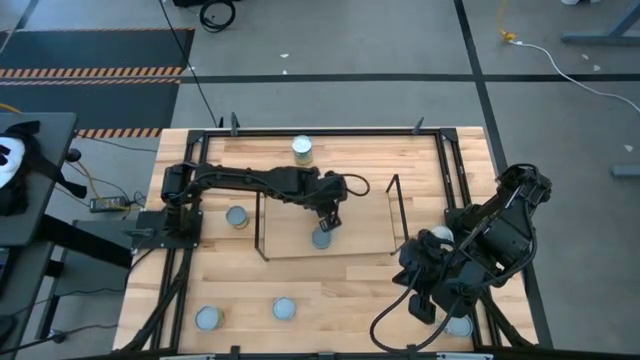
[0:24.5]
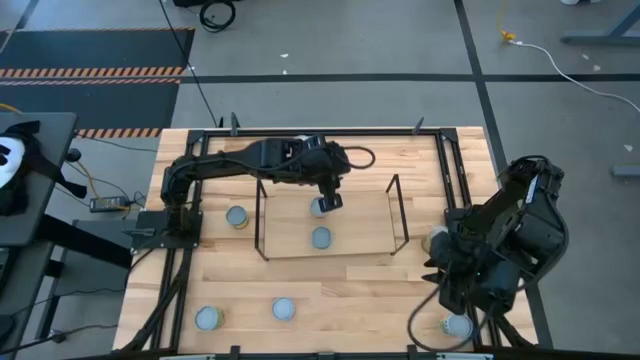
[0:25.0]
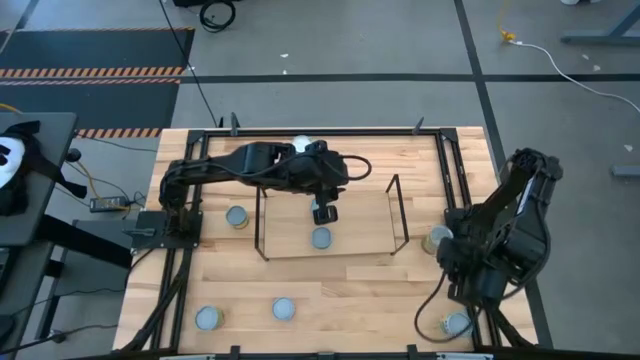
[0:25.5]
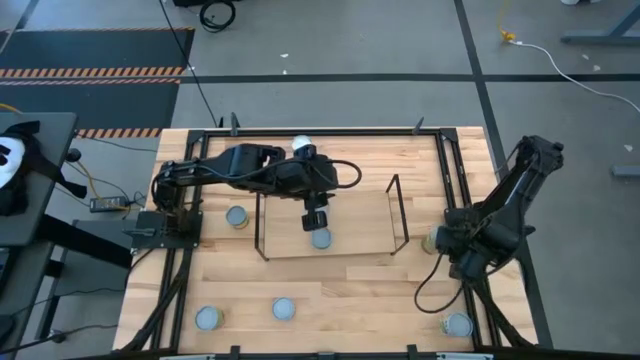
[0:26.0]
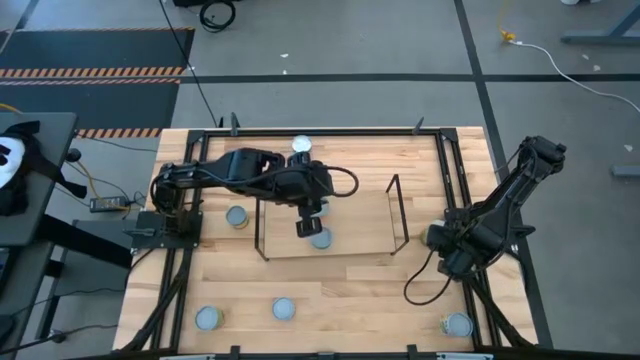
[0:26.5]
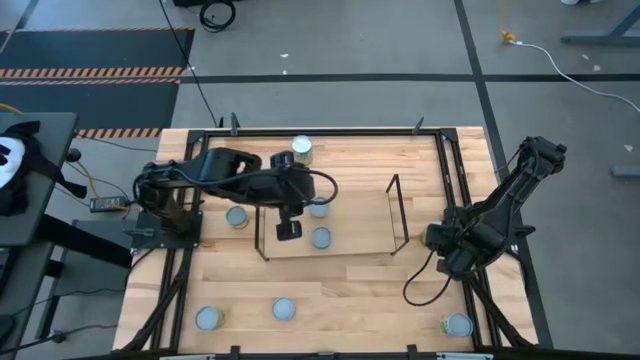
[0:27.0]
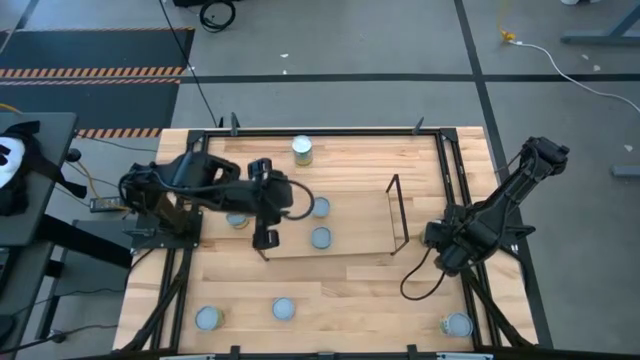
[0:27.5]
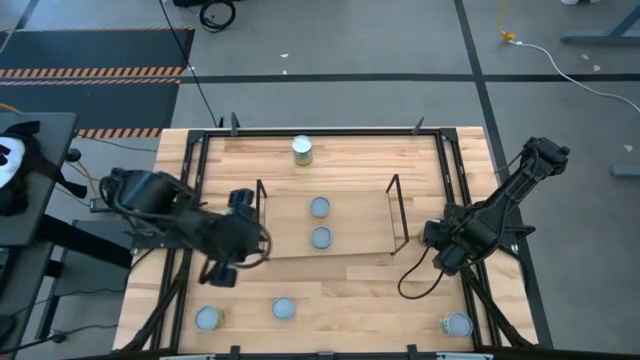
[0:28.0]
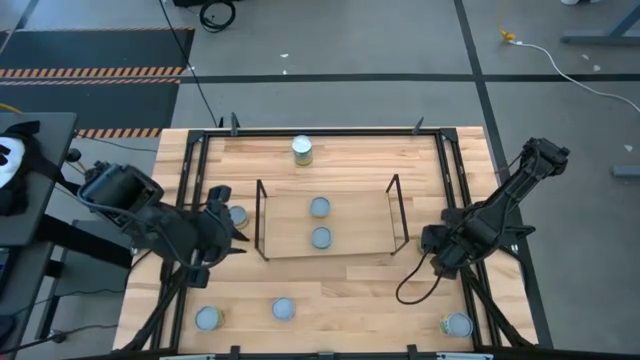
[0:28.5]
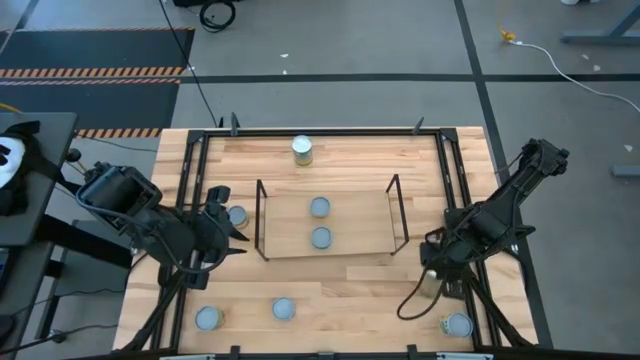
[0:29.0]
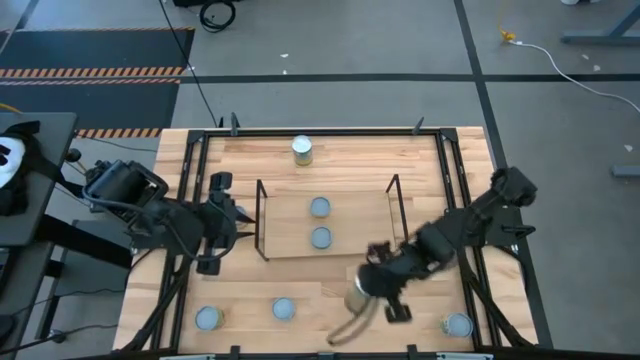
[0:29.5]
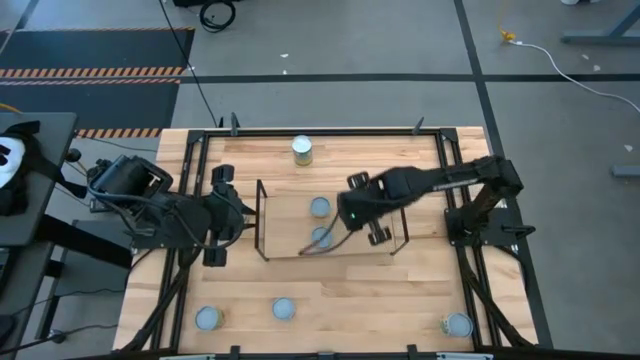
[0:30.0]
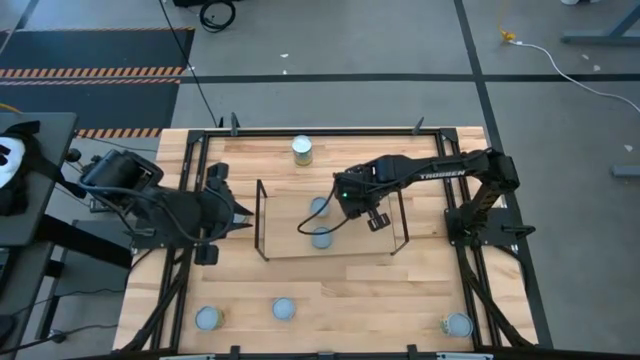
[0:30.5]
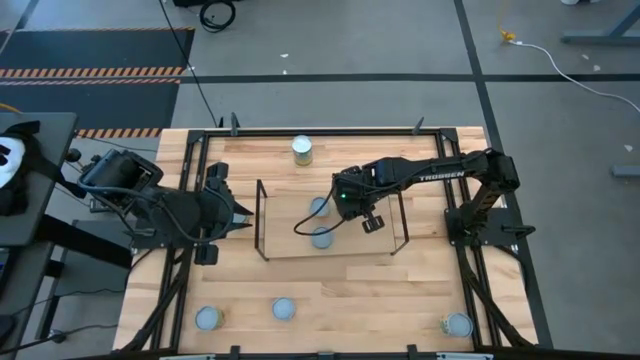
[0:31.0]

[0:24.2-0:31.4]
Task: Pick and place cans onto a shelf
Put the canned oranges on the shelf

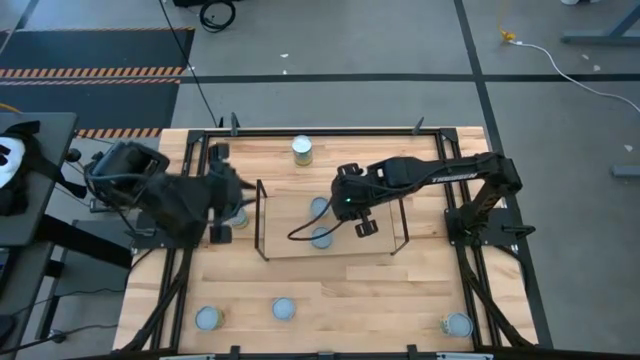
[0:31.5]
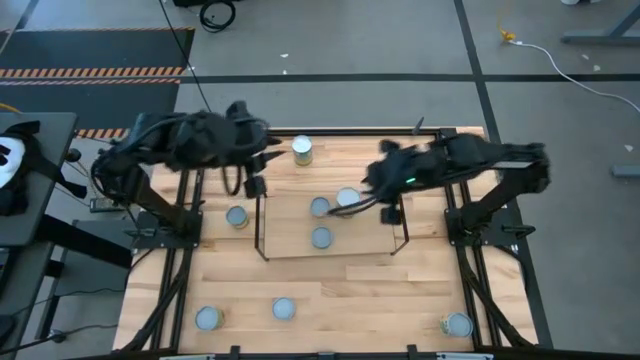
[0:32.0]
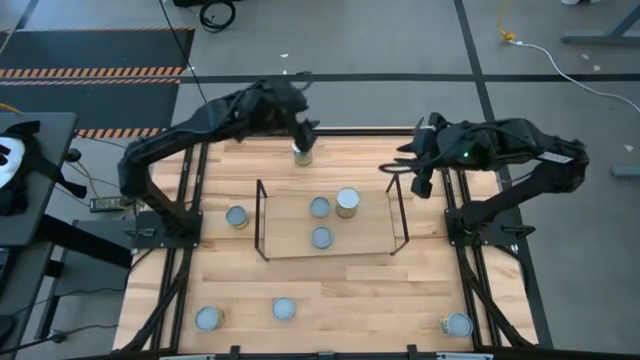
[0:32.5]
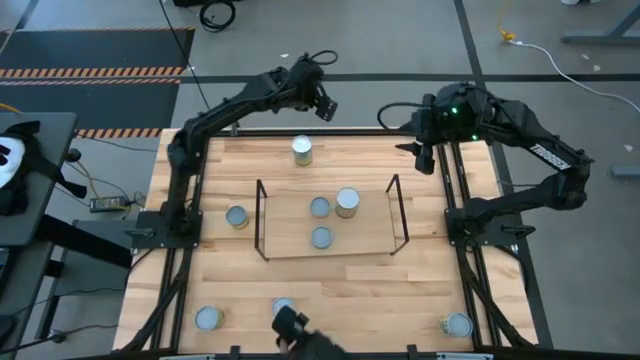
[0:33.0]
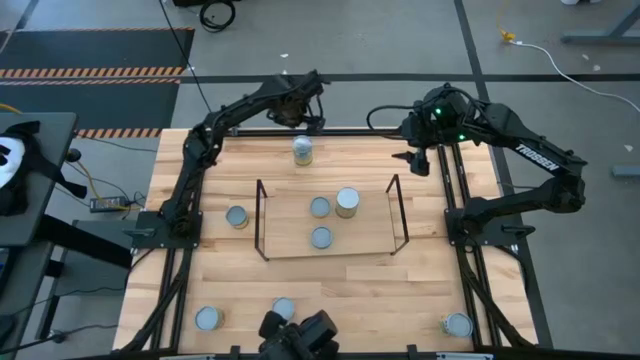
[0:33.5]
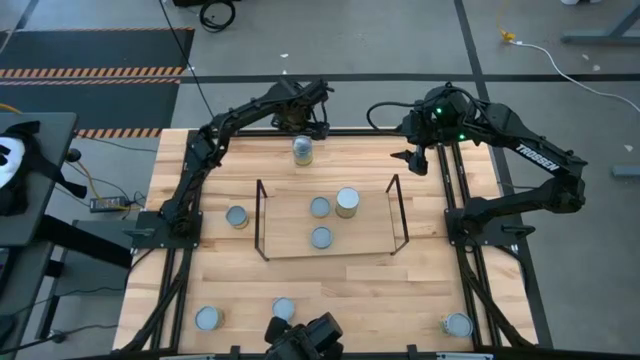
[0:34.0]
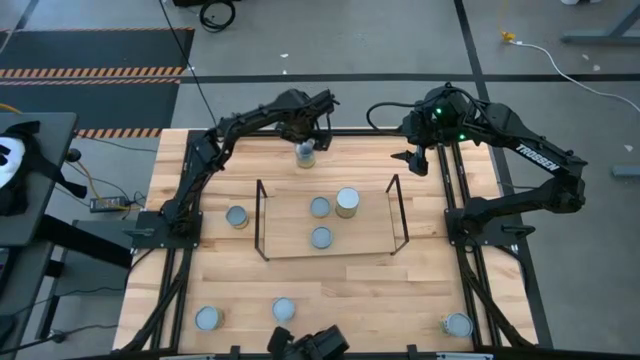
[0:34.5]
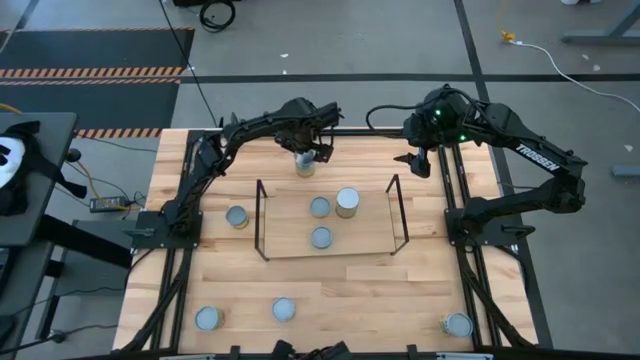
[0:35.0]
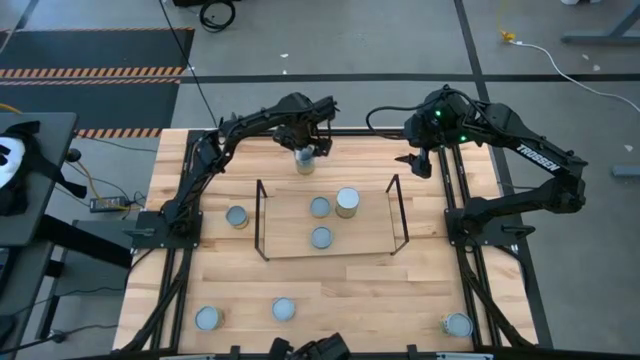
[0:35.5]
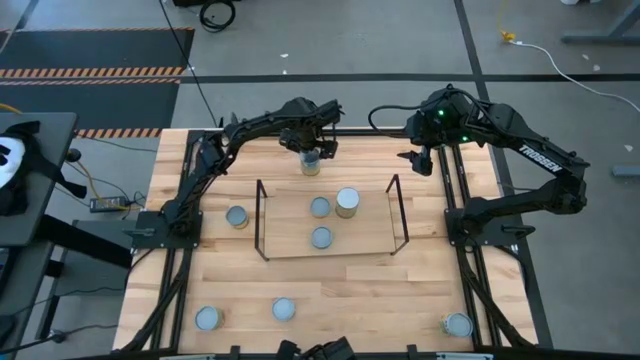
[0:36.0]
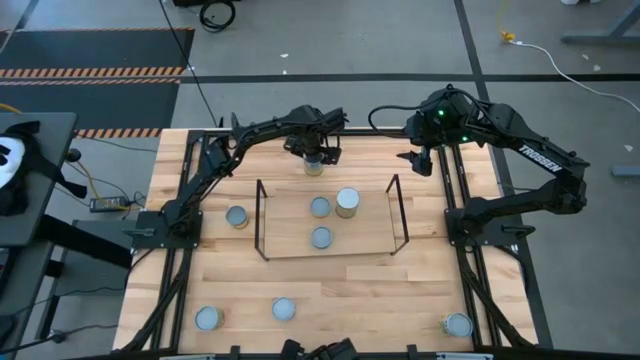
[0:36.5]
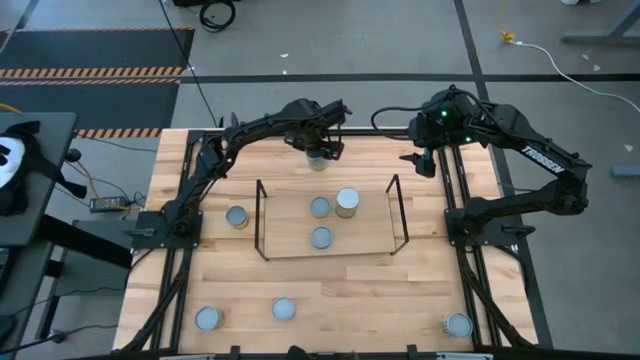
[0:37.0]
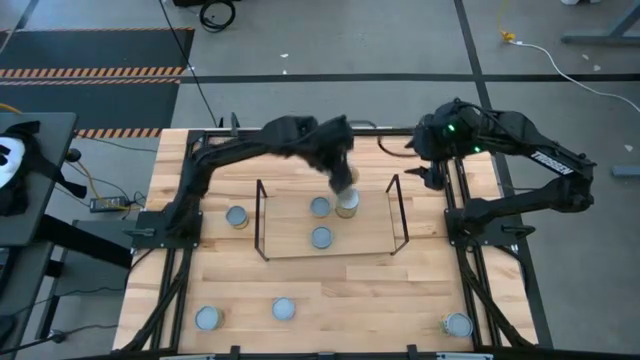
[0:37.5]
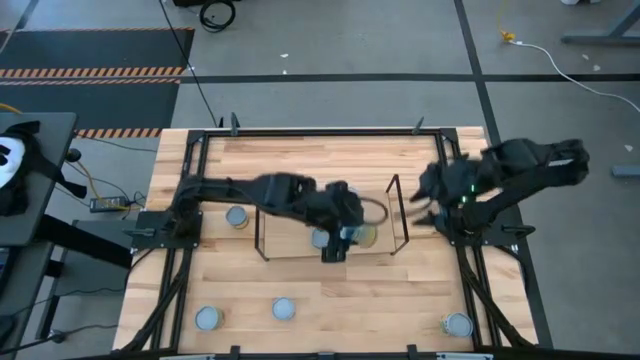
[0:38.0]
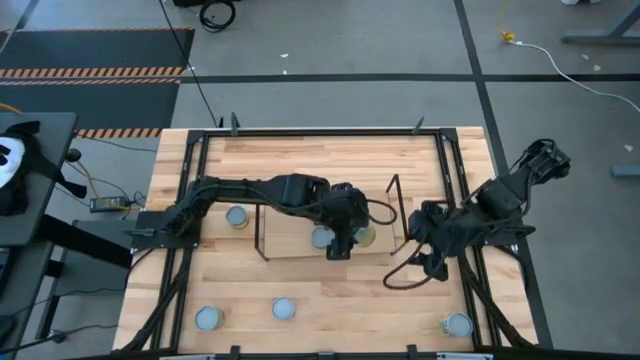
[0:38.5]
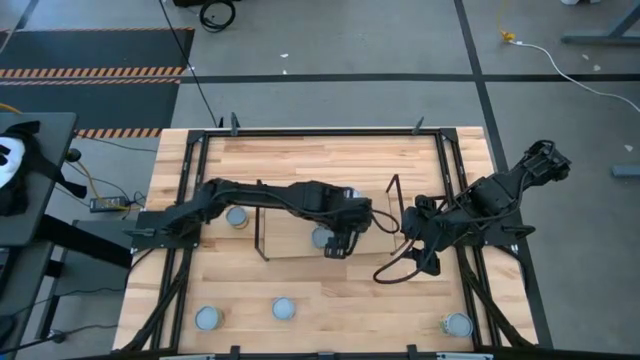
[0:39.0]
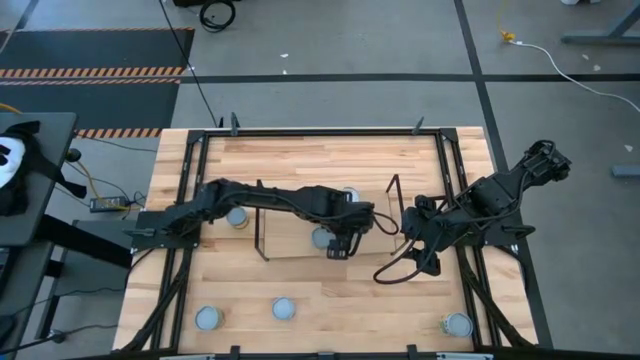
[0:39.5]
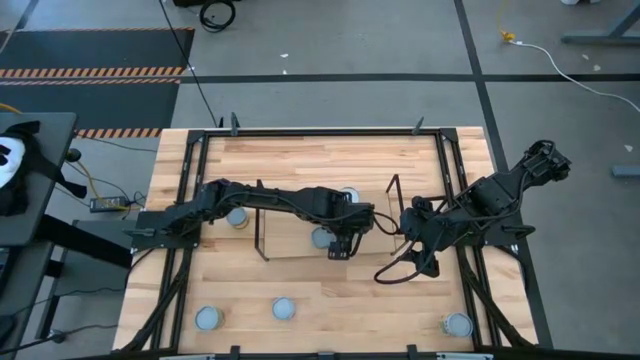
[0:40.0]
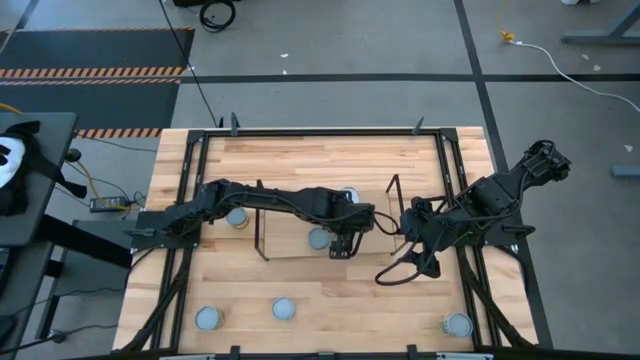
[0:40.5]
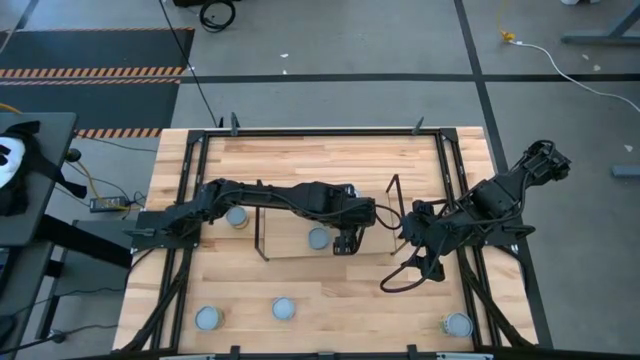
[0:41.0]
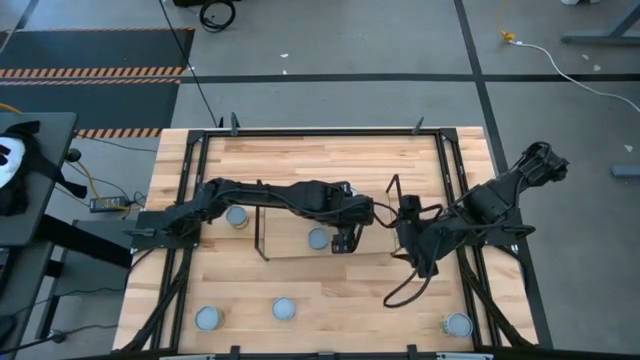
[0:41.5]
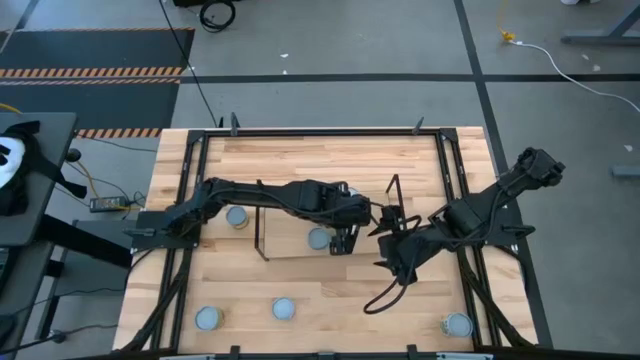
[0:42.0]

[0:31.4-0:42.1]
Put the canned carrots on the shelf

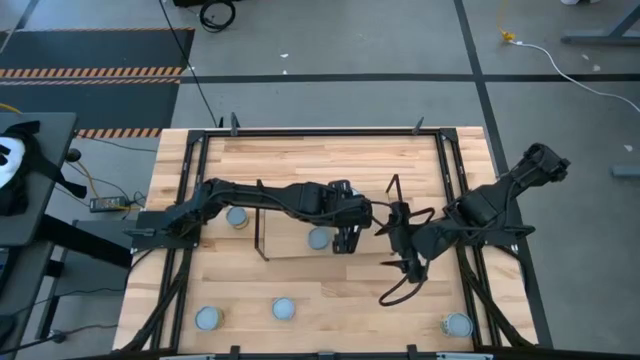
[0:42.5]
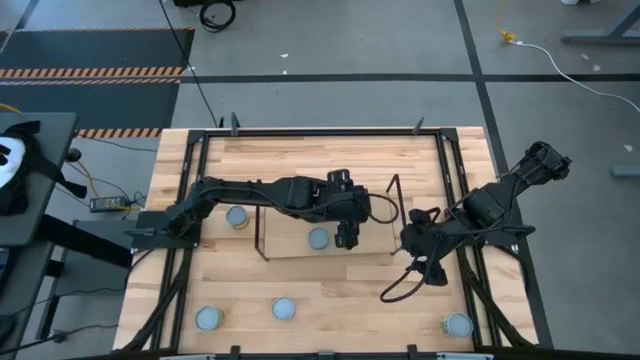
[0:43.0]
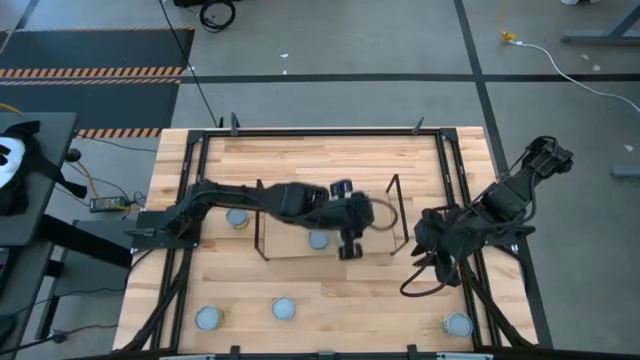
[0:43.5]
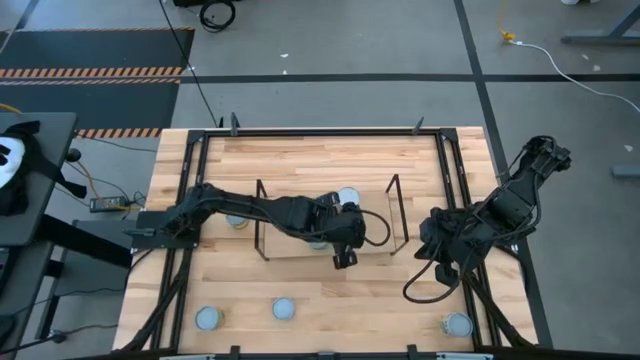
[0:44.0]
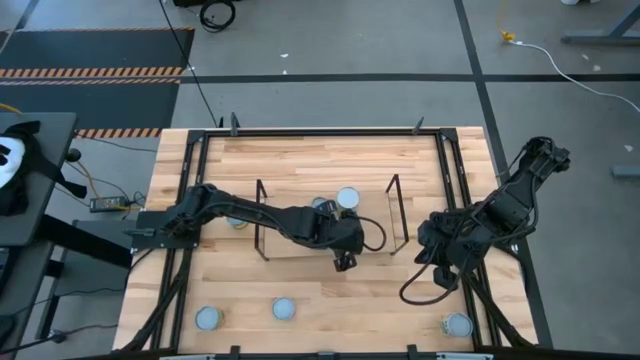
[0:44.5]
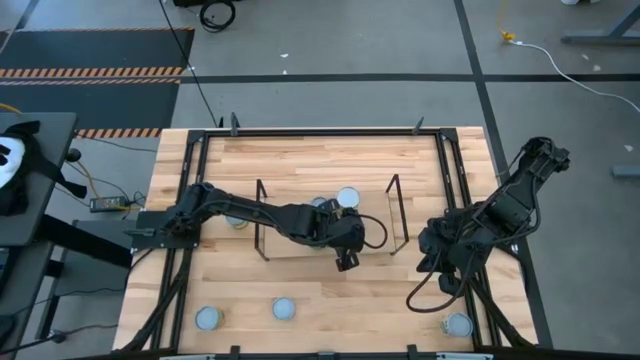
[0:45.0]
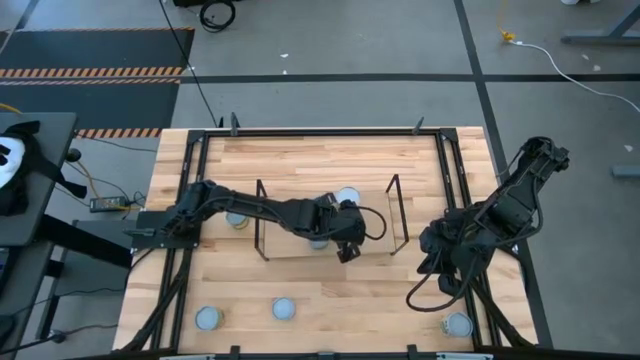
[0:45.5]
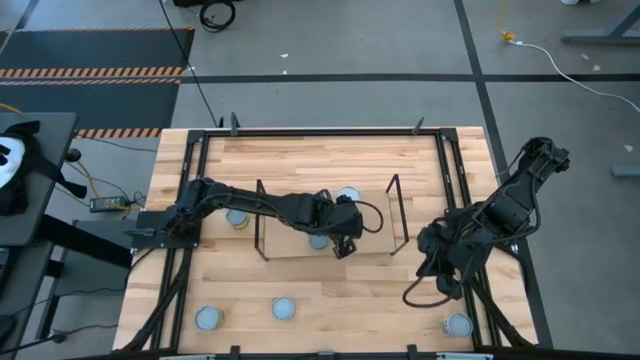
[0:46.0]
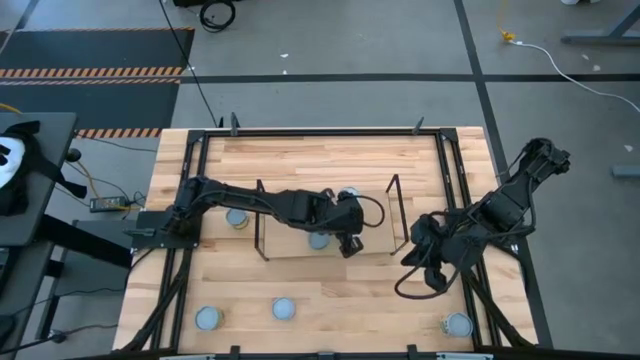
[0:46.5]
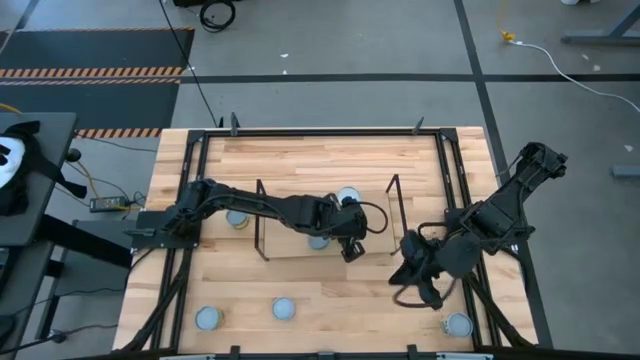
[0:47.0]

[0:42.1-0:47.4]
Adjust the canned carrots on the shelf
